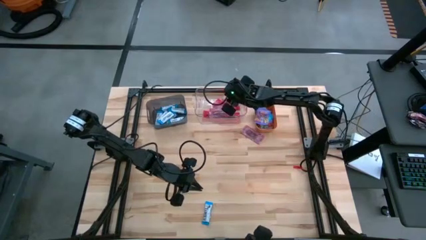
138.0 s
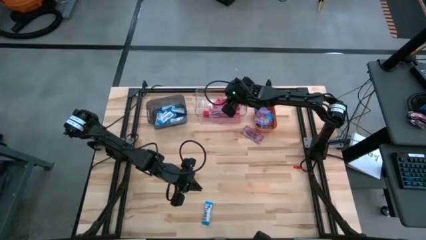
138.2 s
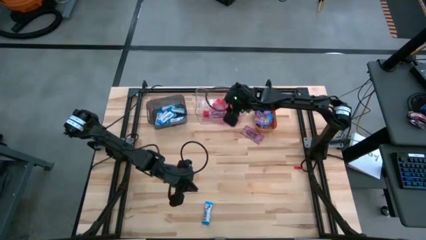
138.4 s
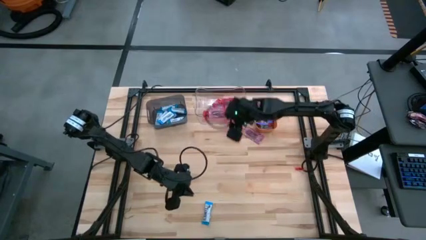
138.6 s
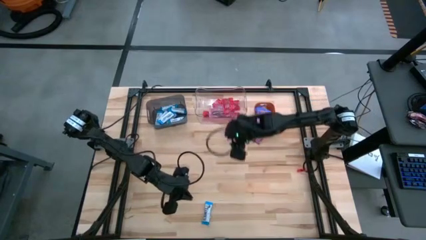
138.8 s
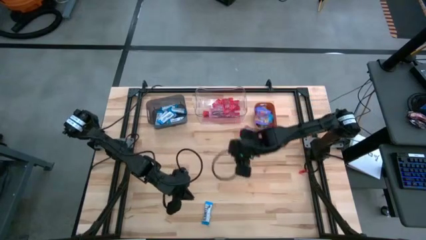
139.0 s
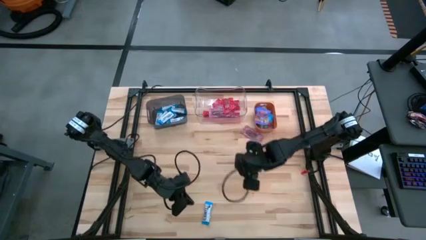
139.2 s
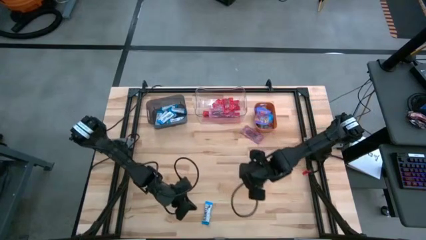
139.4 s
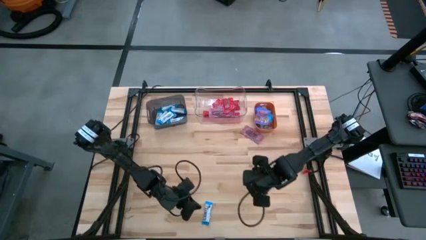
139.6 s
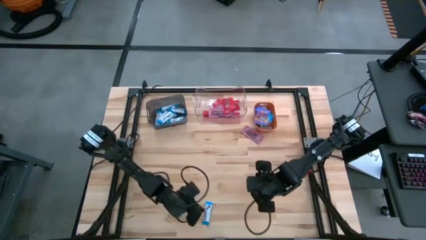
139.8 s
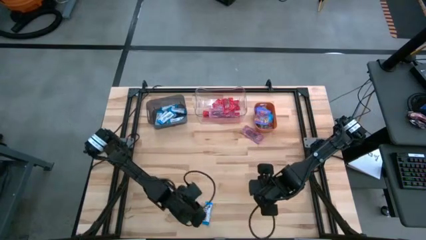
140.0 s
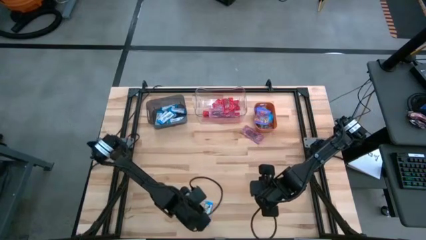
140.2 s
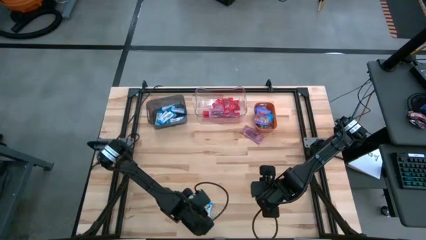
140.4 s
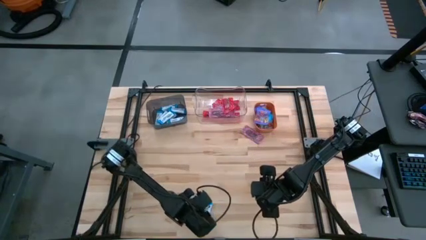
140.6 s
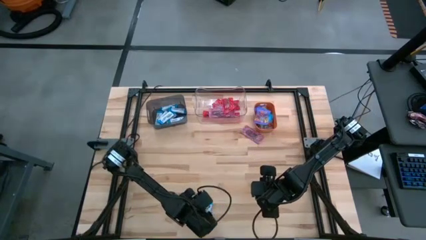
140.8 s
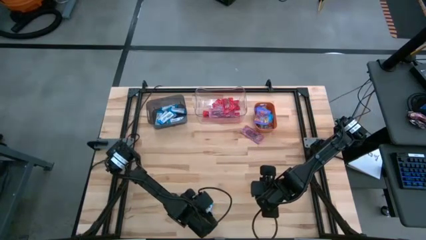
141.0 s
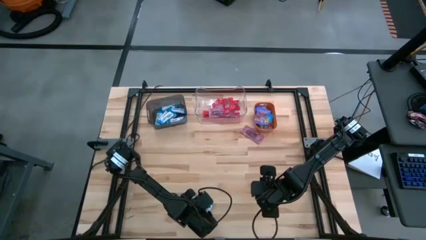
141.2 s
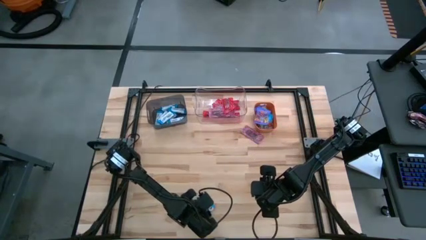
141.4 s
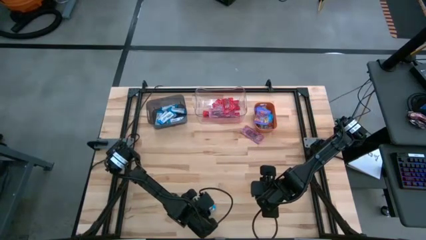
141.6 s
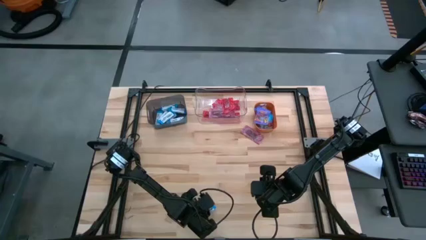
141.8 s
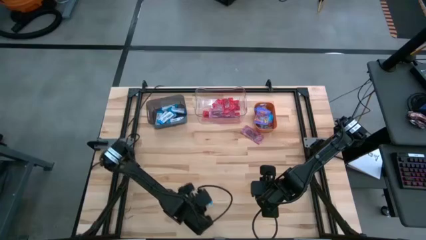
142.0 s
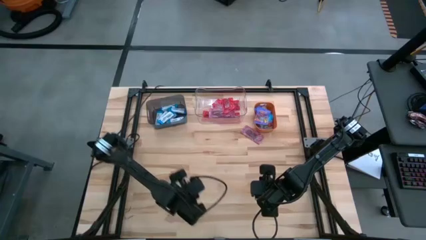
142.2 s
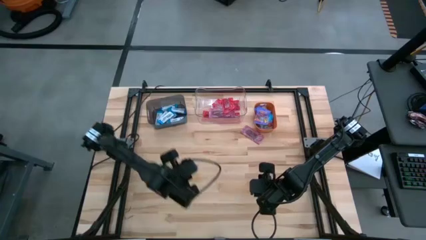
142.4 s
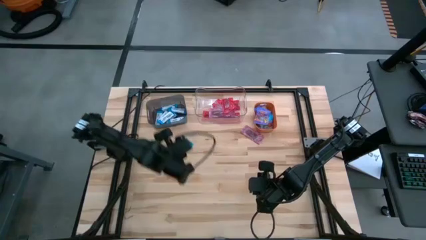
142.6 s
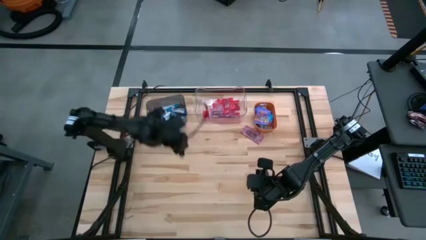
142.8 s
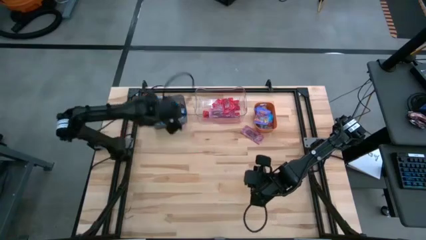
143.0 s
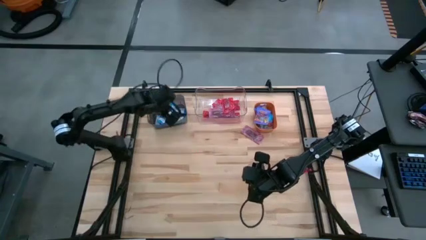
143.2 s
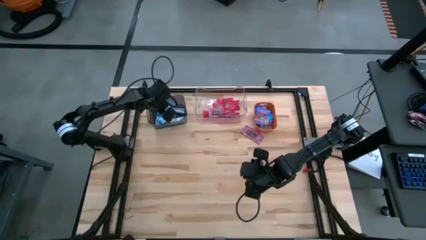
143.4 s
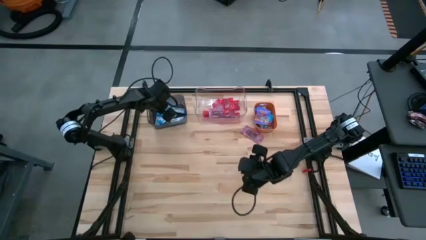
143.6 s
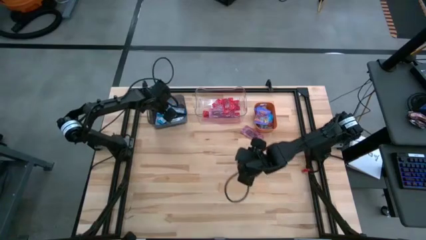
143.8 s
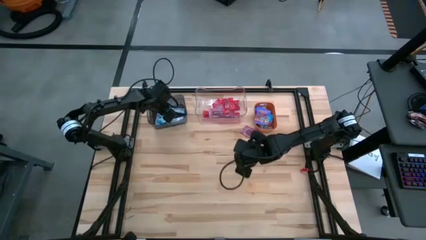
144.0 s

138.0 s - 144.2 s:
Task: Sort candy
Put the white chocolate into the black bin

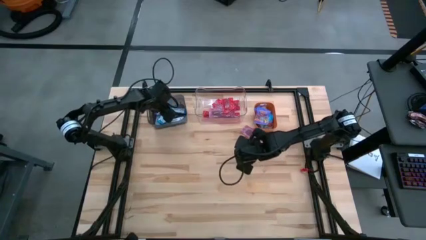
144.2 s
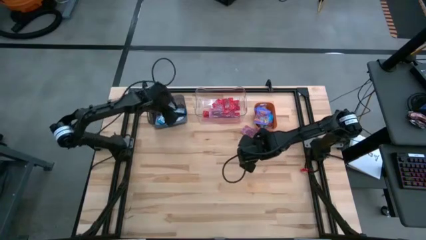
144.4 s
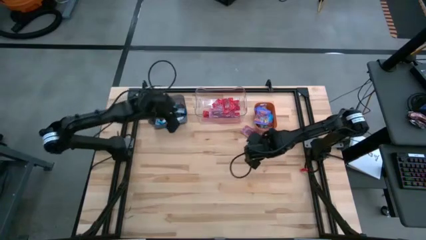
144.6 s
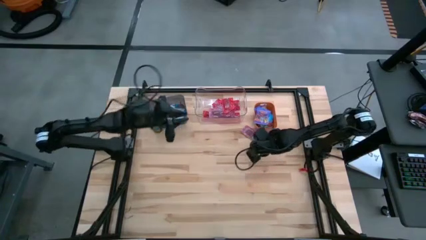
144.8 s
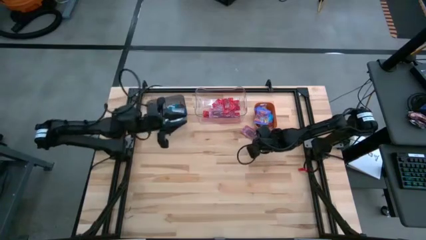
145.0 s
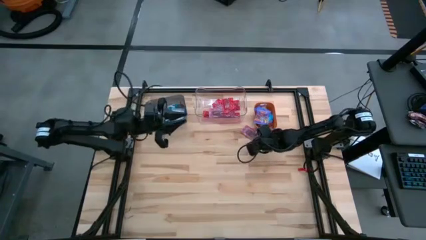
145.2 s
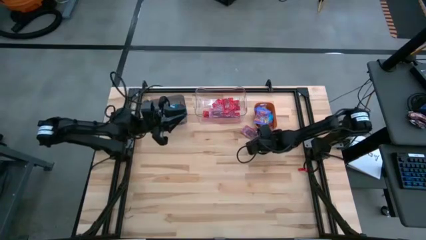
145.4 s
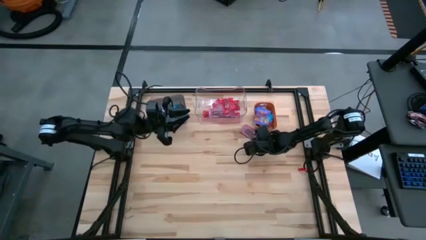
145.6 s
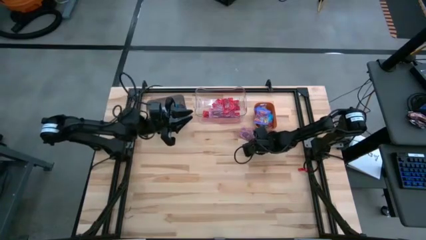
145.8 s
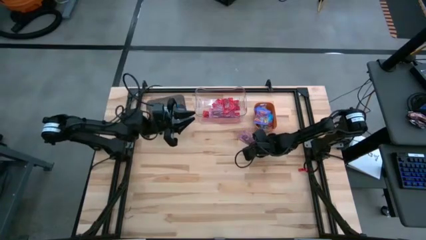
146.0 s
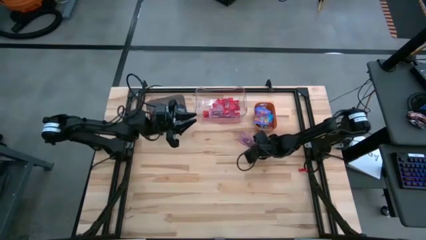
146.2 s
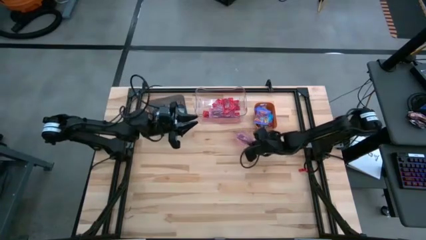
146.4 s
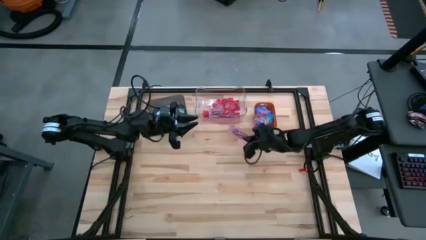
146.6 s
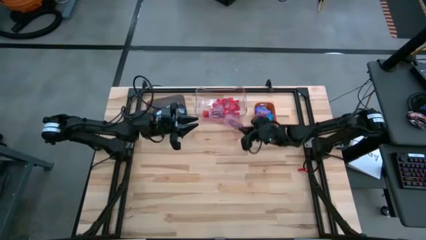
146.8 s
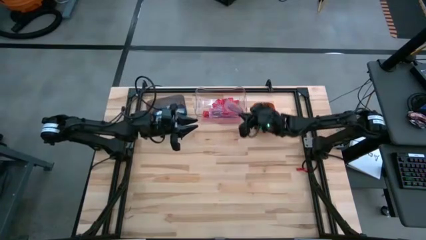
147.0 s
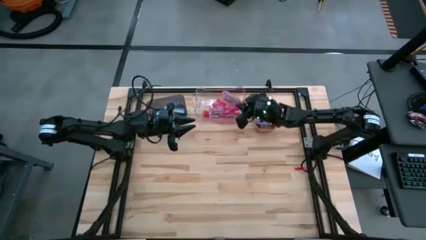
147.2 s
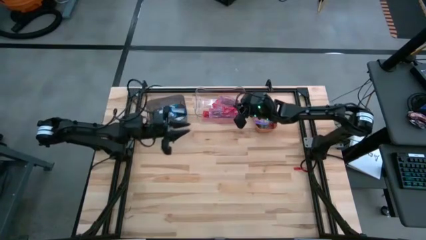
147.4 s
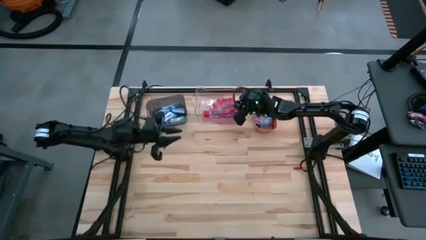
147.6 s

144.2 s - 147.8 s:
Put the red chocolate into the transparent bin

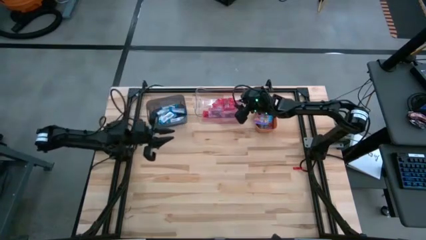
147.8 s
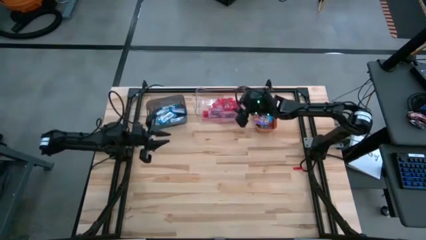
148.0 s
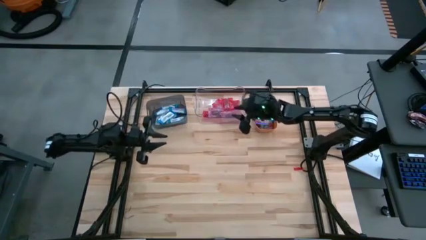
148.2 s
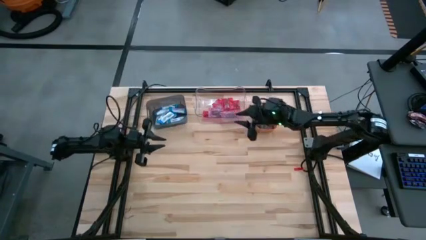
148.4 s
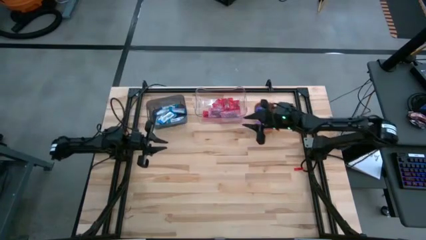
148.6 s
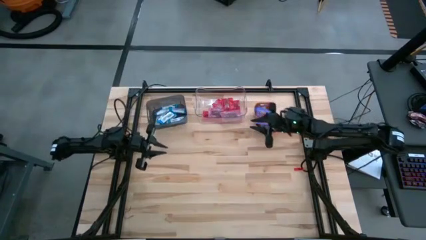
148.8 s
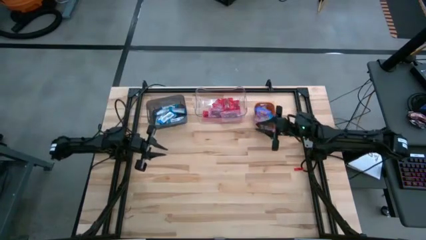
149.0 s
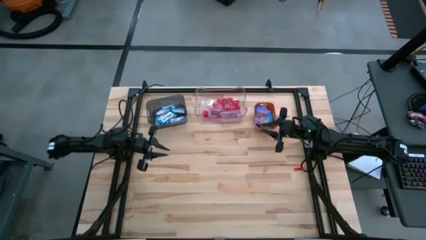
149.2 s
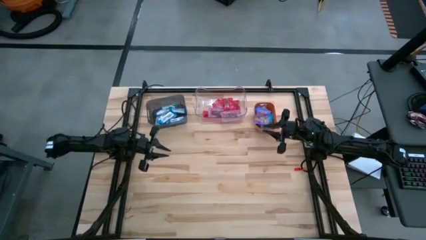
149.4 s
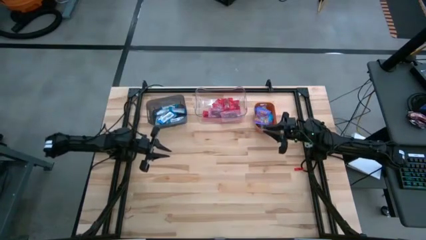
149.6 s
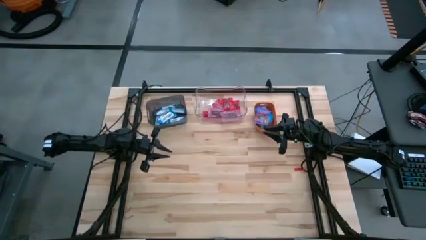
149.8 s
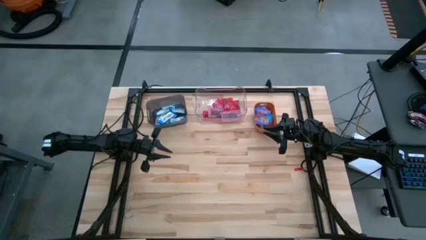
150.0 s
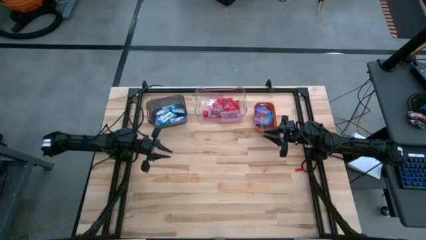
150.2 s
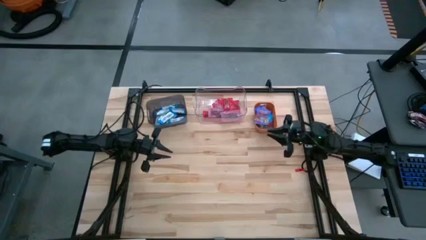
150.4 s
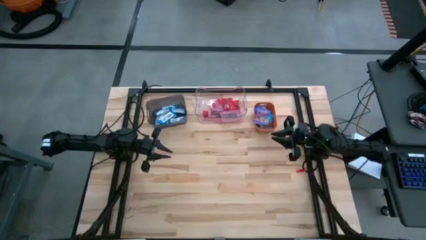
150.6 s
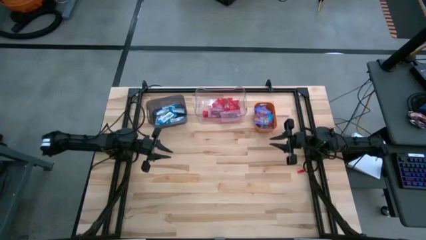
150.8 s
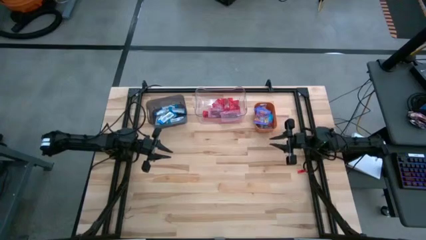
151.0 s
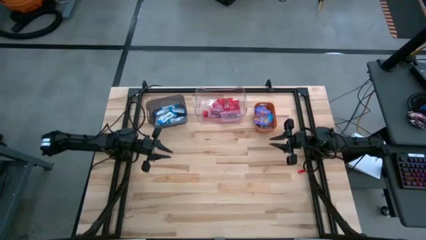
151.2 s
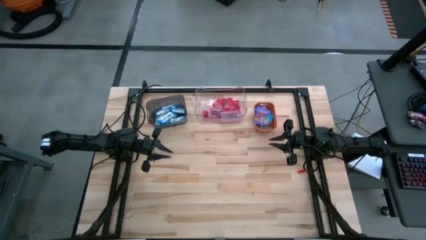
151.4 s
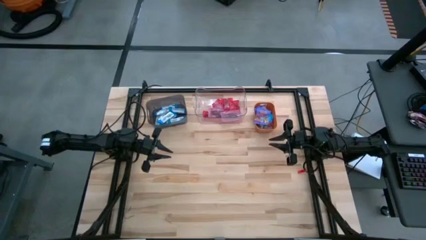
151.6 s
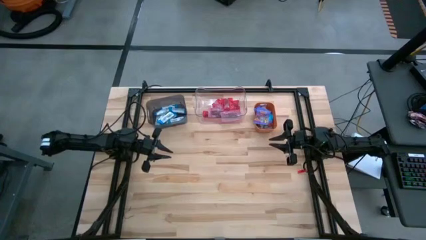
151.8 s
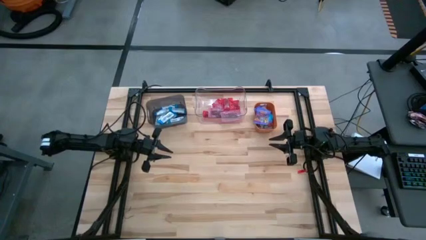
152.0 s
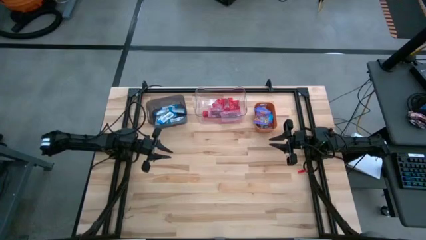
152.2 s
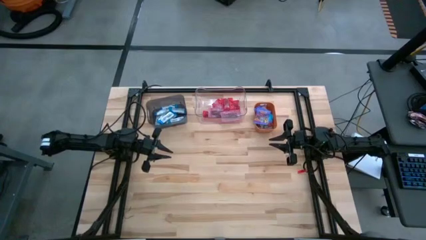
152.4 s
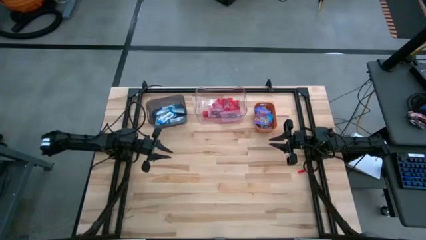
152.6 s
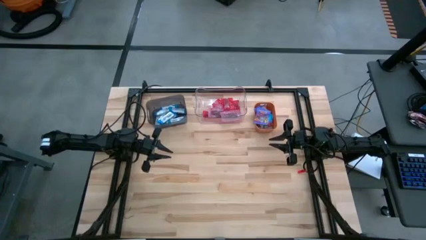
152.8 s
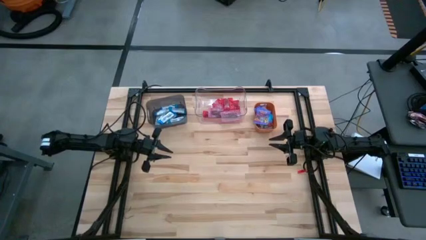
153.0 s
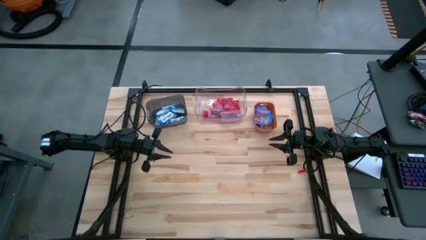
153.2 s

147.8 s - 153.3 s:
Return to Home Position

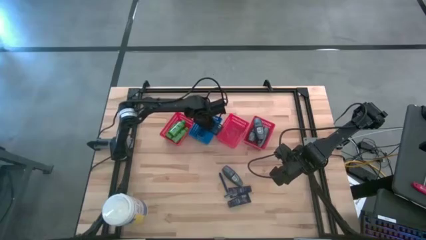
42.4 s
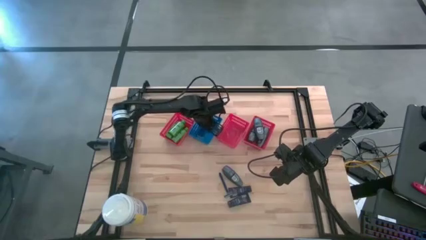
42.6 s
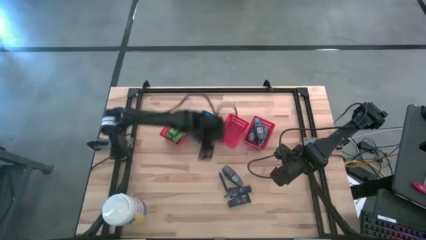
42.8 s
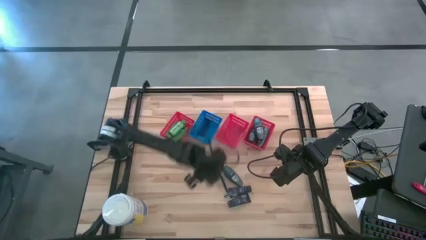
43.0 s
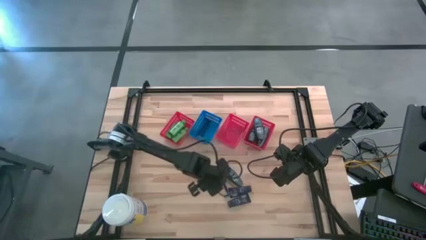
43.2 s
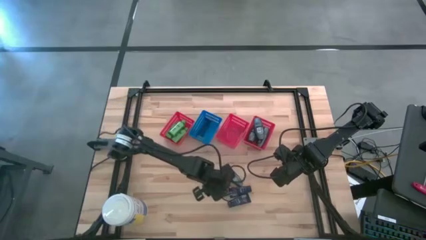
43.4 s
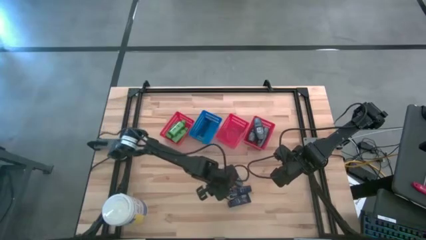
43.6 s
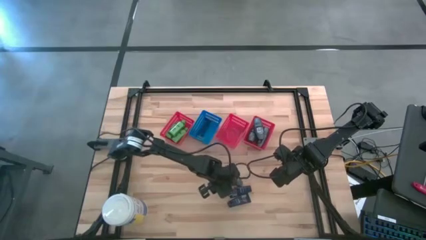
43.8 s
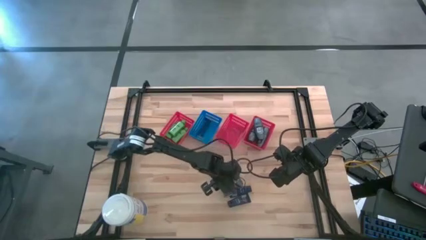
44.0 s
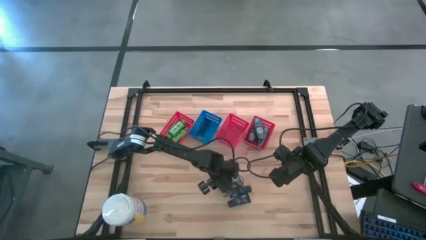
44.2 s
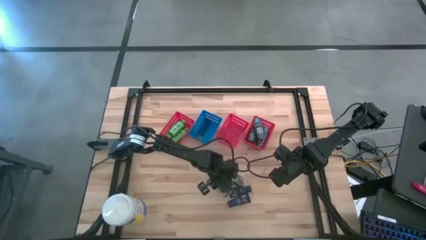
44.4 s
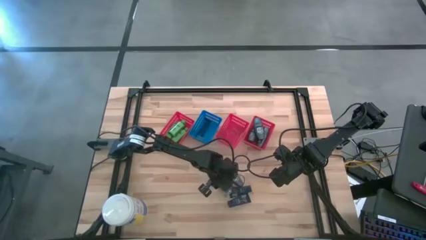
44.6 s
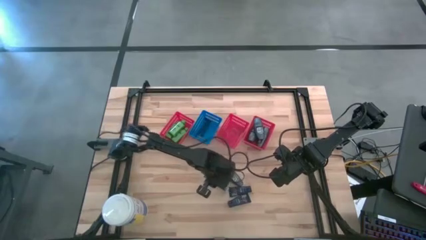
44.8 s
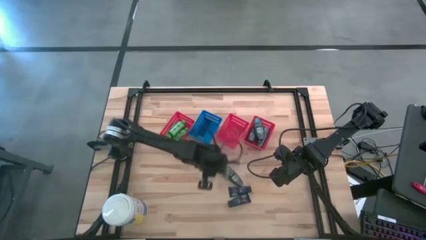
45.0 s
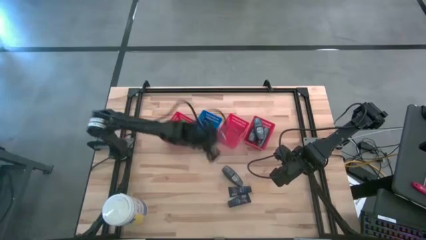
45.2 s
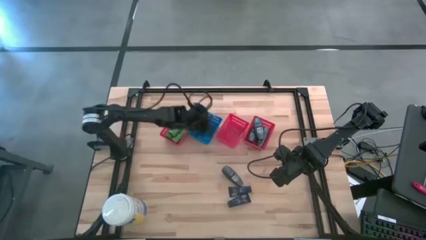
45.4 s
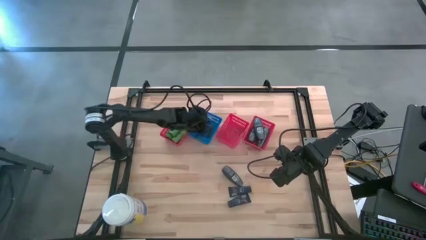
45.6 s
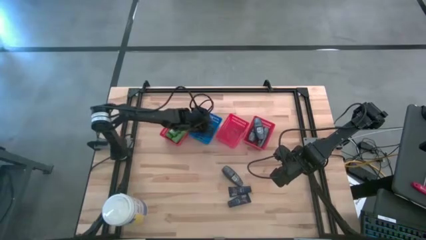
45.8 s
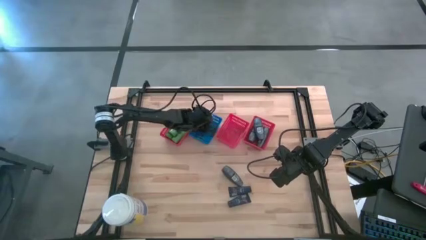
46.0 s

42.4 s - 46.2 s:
Task: Pick & Place Travel size toiletries
Put the blue razor into the blue bin
